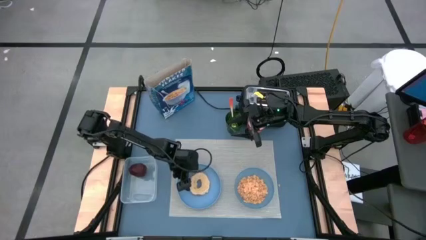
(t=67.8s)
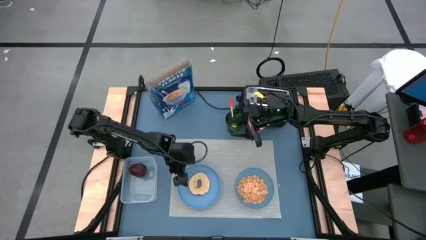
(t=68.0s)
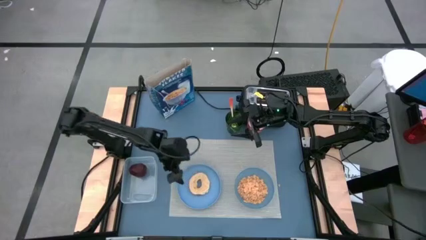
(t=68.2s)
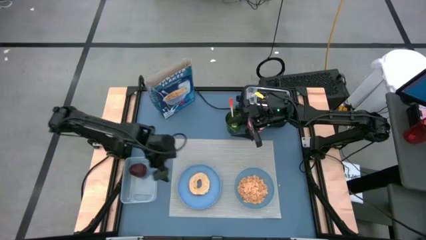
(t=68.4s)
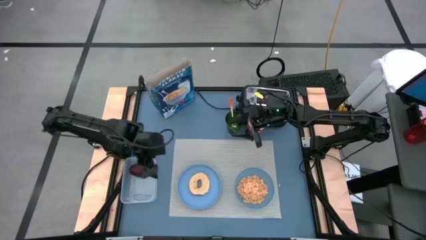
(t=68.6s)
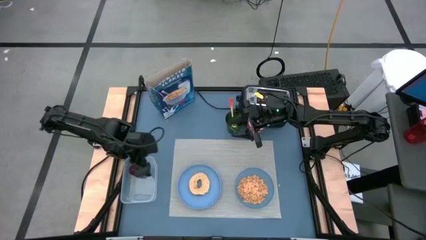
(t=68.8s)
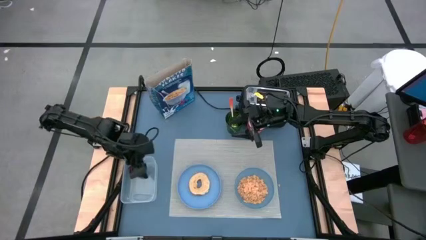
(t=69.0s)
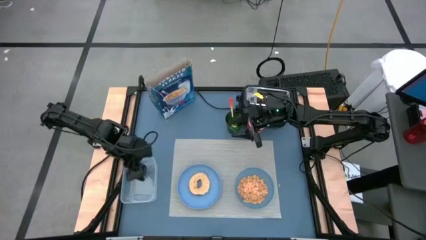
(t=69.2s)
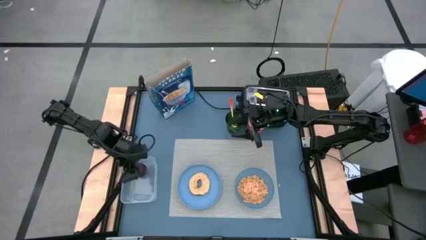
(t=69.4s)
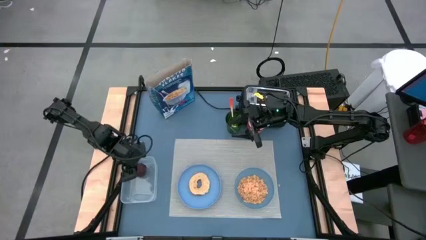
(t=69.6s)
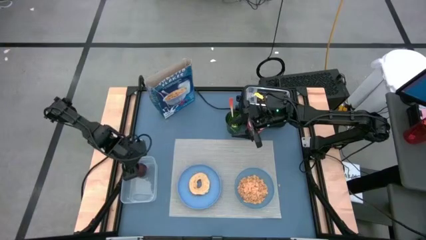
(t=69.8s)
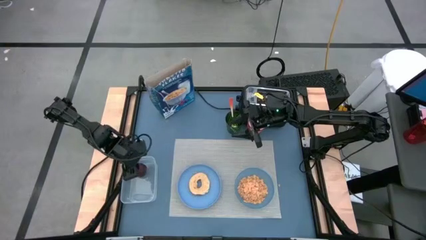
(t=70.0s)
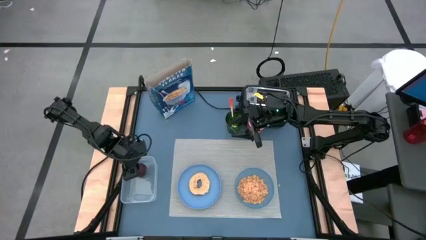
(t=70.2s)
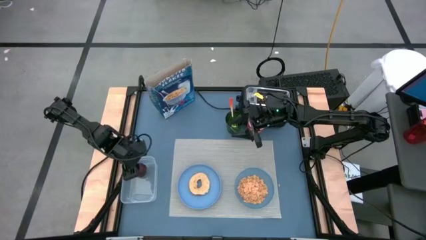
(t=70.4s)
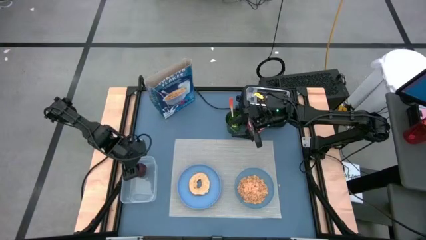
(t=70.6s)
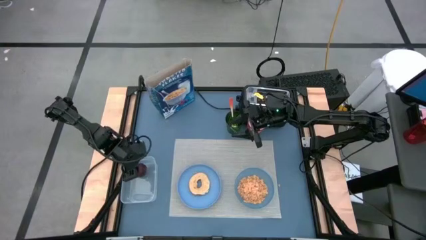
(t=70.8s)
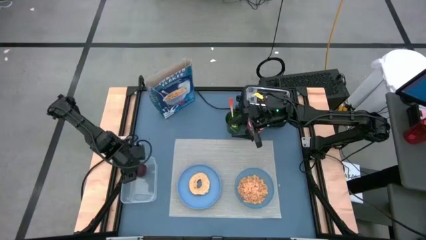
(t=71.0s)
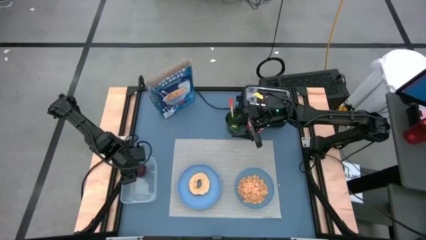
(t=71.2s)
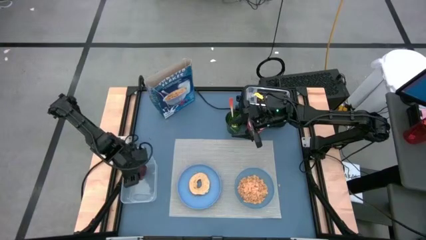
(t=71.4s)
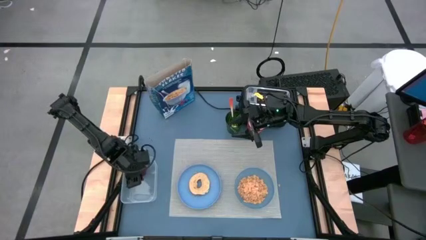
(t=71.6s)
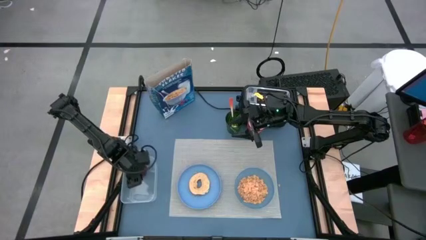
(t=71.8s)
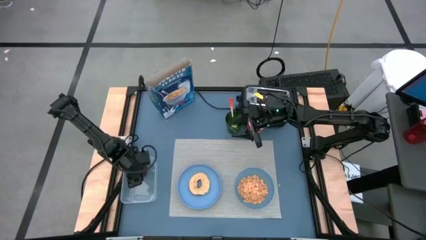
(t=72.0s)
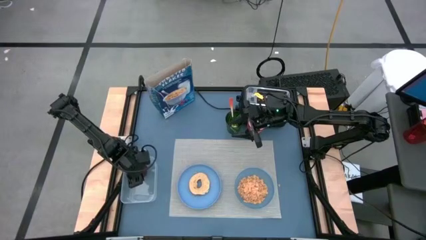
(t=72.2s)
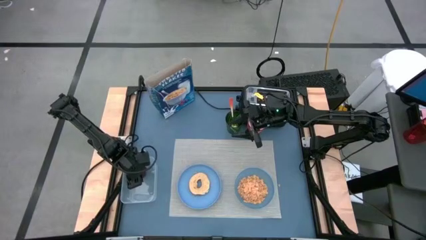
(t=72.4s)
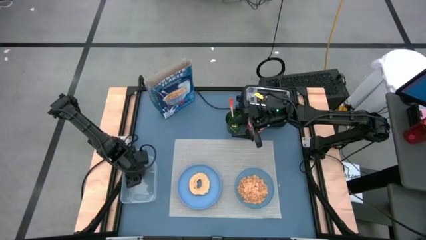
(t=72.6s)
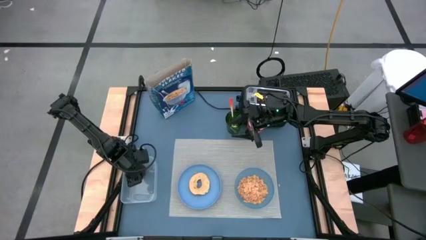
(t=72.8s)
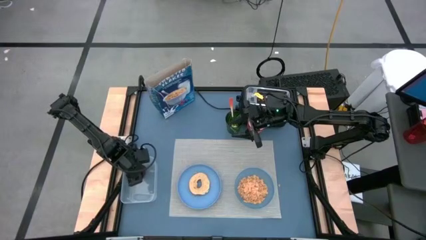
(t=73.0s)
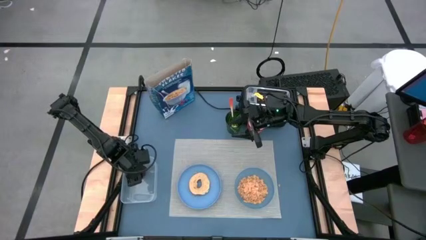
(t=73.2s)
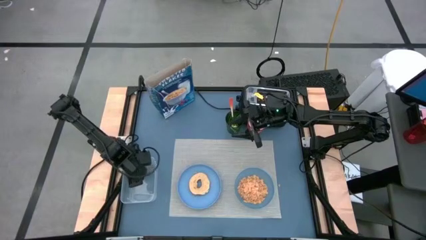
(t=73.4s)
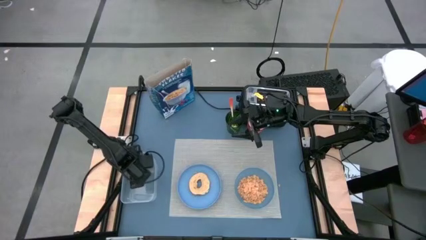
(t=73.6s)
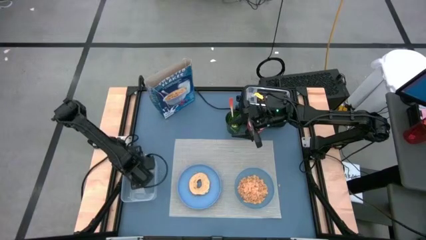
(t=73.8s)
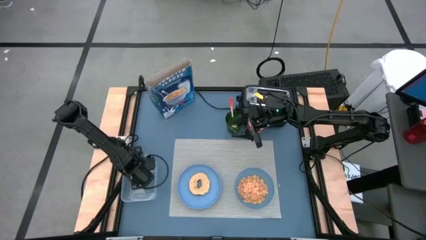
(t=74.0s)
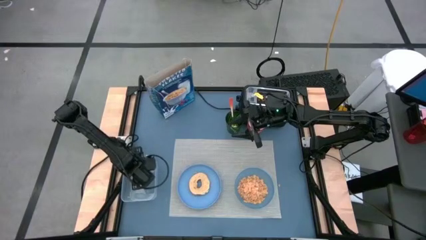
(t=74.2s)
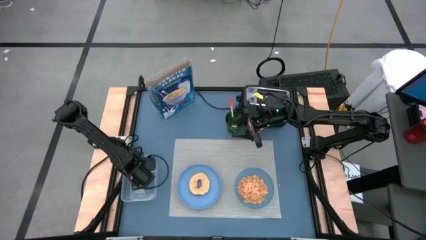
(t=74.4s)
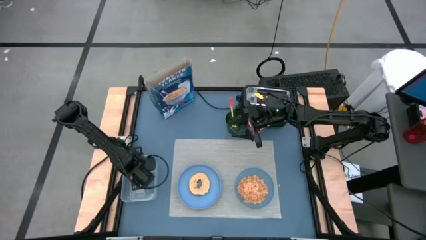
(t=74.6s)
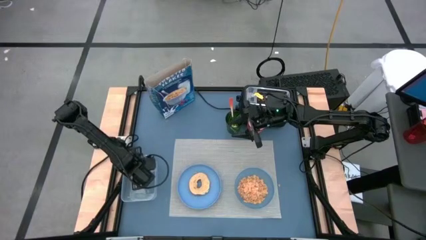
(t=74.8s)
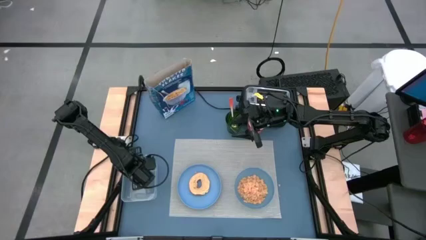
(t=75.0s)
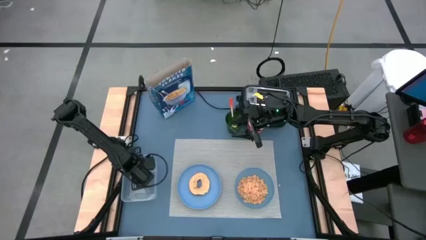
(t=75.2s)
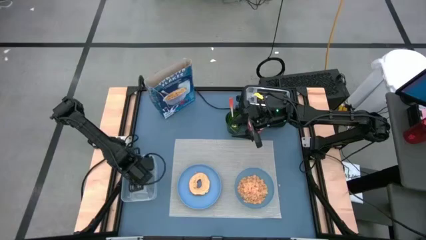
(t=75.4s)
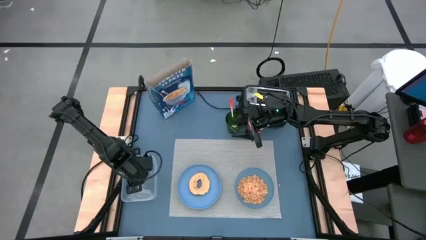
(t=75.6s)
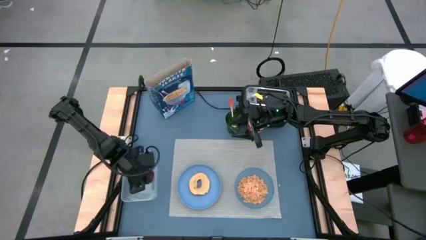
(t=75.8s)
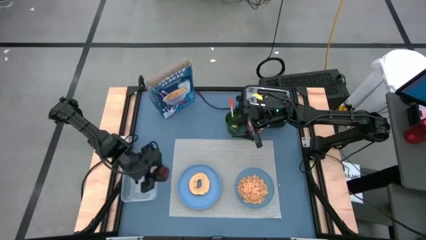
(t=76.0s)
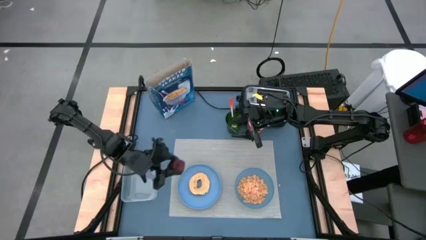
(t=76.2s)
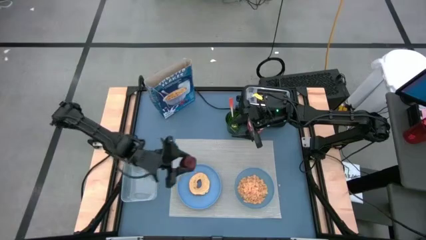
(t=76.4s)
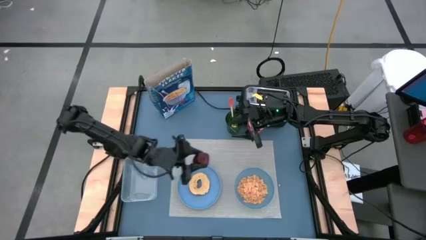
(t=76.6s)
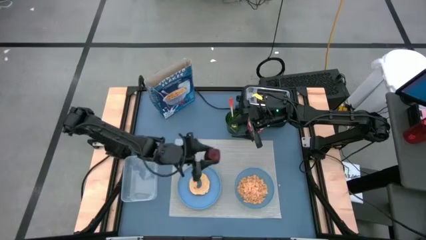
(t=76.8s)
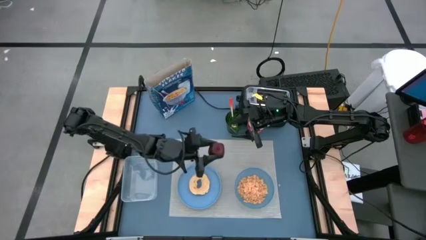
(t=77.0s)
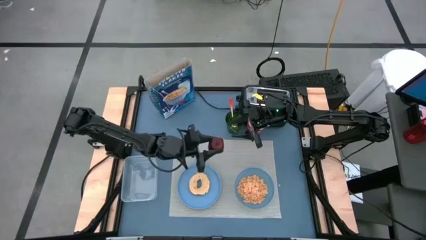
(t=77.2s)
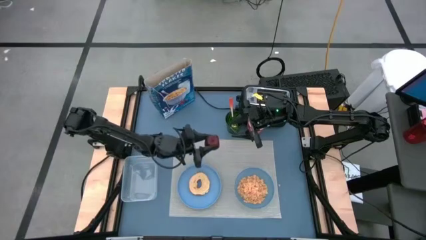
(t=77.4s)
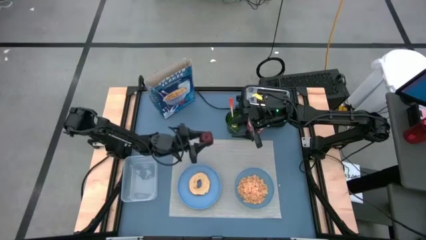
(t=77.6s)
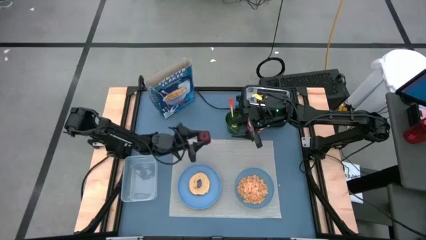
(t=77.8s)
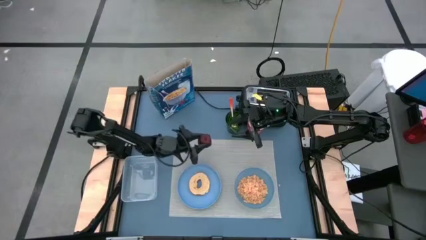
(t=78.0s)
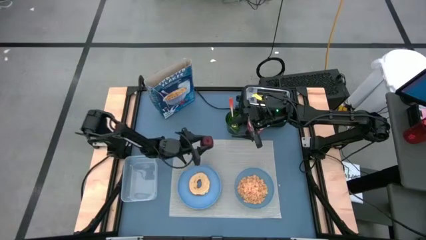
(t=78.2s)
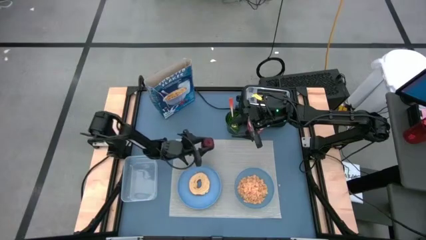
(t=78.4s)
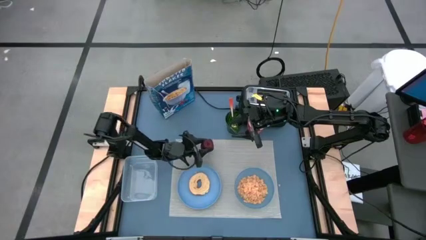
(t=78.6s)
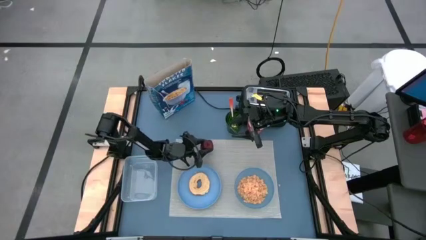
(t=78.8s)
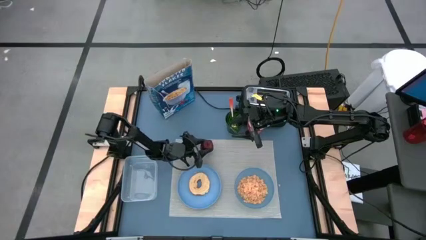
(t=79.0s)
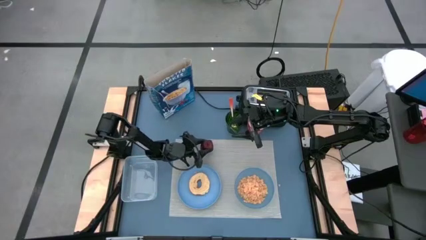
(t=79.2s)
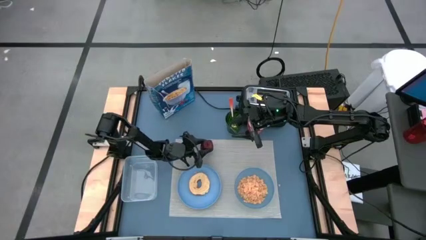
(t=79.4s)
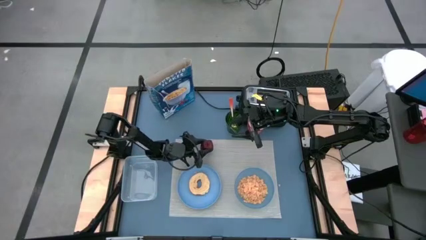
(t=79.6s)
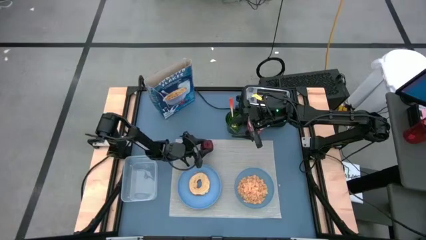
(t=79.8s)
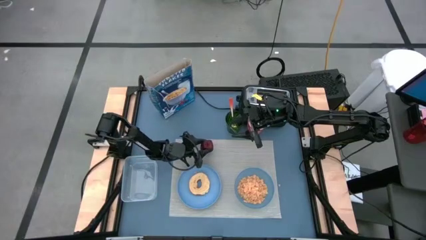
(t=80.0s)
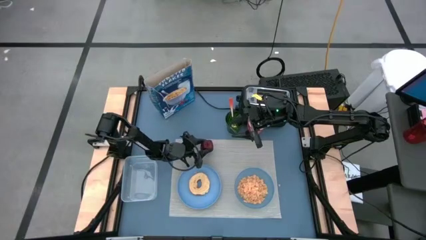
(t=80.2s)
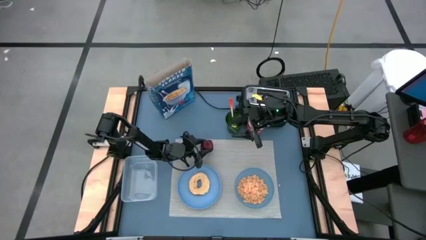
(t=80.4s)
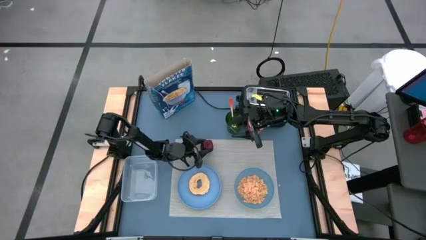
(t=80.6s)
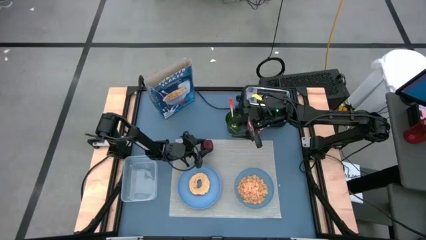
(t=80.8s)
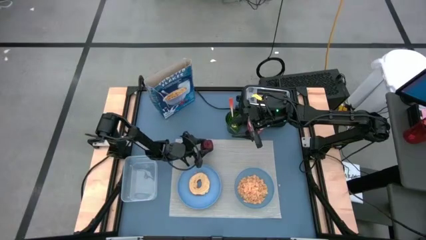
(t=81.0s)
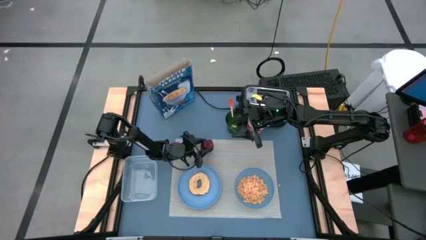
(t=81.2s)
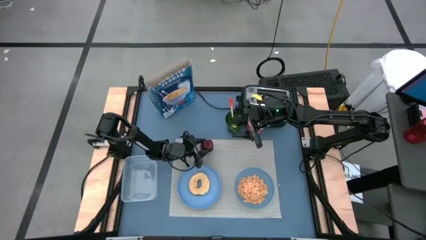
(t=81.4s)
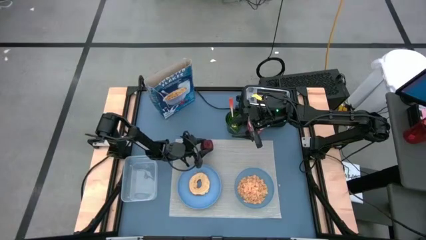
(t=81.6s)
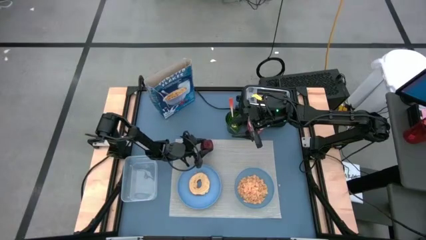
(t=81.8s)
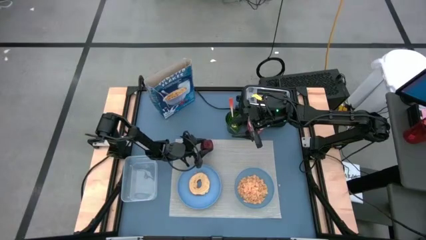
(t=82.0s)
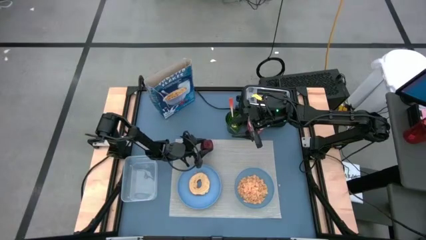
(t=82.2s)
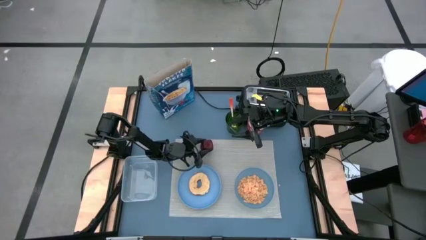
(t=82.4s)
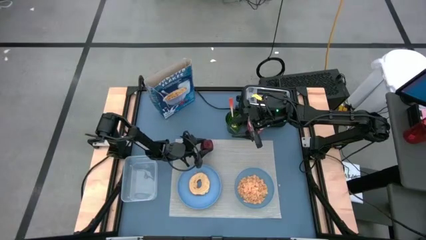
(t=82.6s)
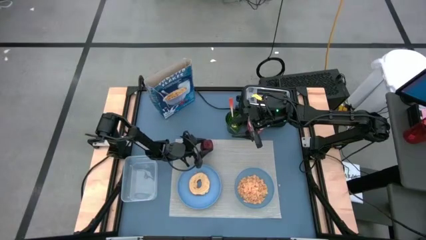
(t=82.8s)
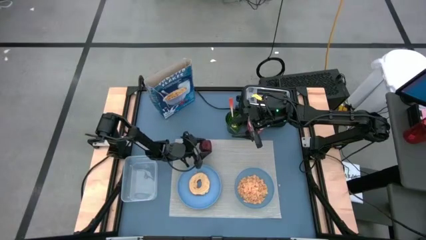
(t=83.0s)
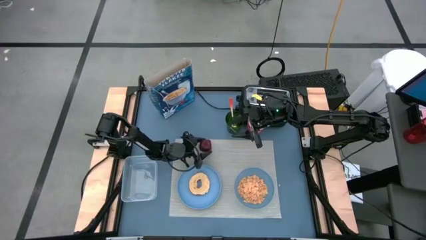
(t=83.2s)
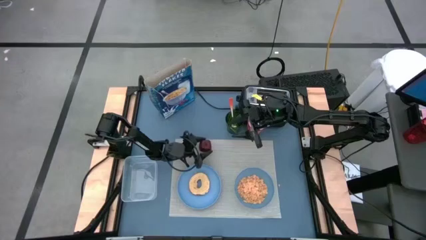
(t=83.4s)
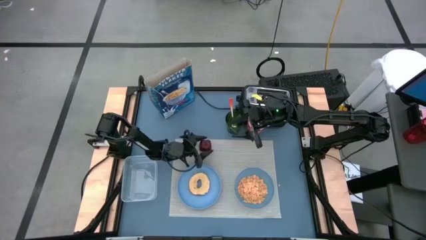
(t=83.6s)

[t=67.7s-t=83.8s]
Task: Arrange a breakfast setting
Put the red apple on the gray placemat
